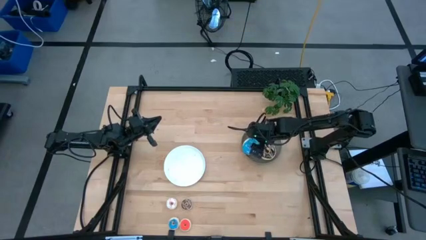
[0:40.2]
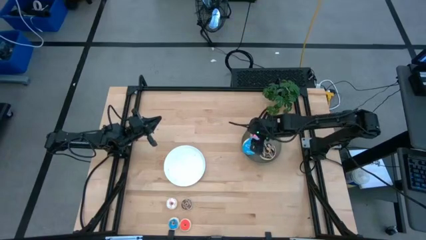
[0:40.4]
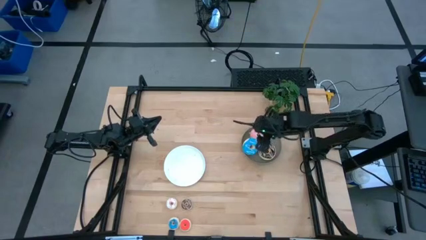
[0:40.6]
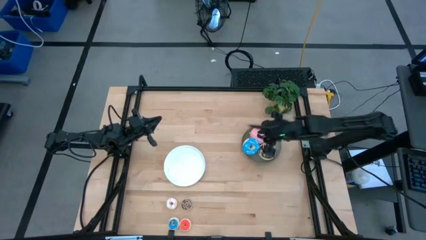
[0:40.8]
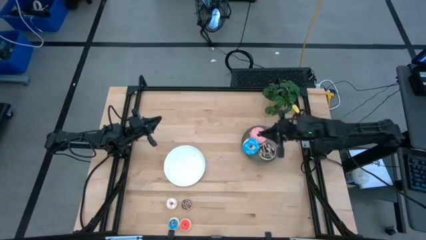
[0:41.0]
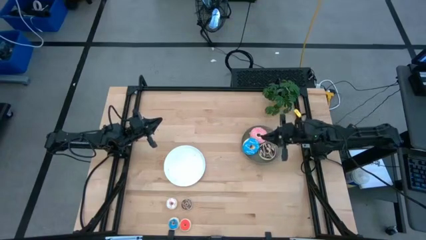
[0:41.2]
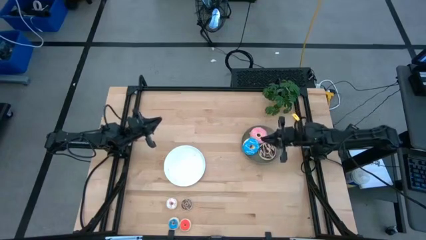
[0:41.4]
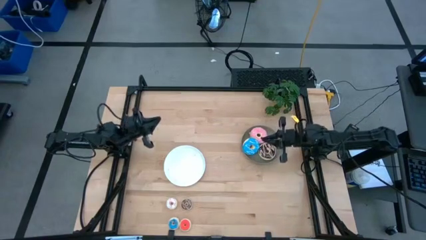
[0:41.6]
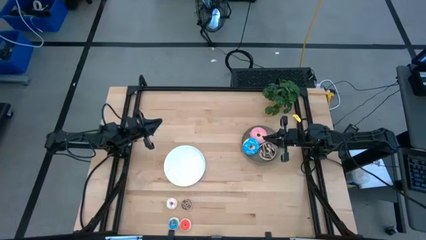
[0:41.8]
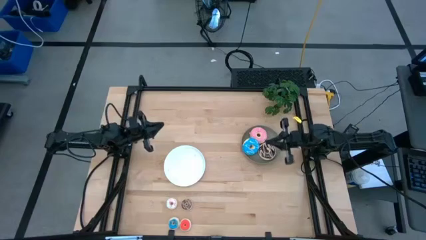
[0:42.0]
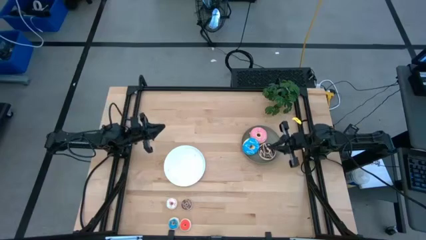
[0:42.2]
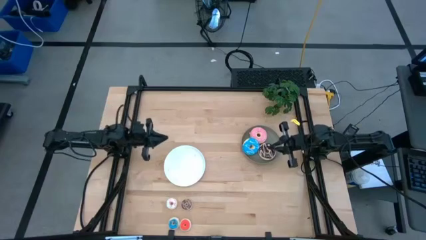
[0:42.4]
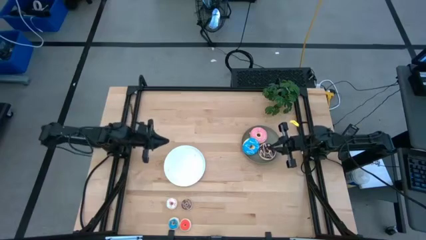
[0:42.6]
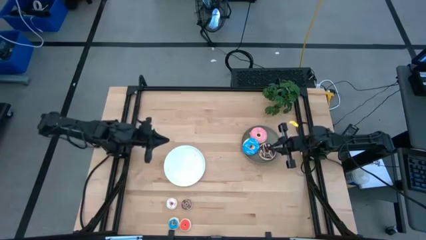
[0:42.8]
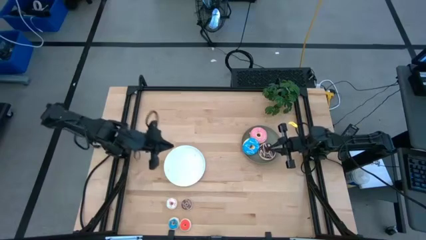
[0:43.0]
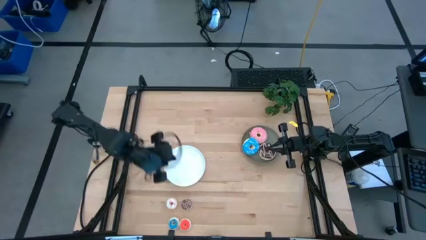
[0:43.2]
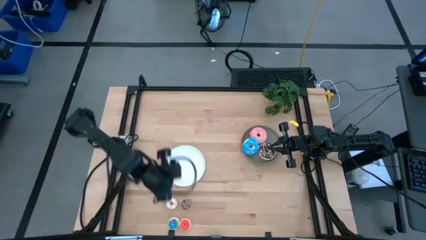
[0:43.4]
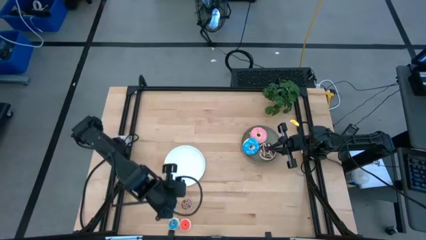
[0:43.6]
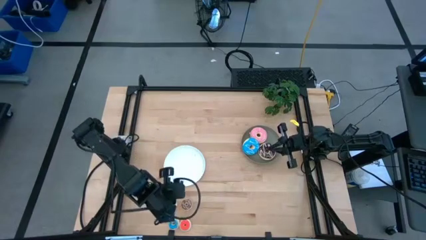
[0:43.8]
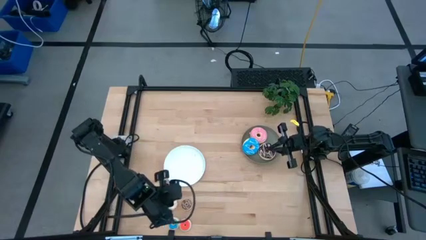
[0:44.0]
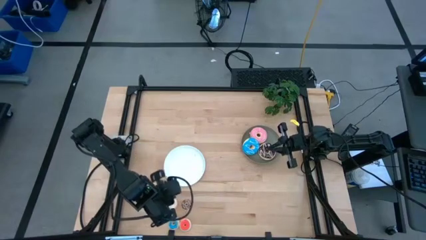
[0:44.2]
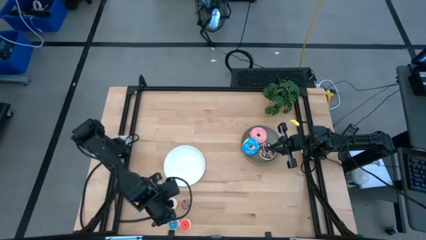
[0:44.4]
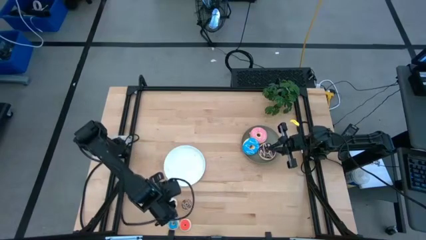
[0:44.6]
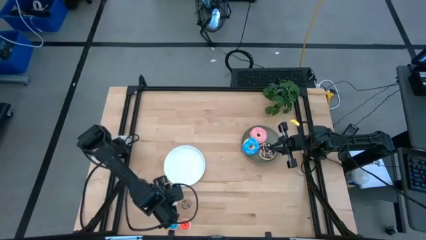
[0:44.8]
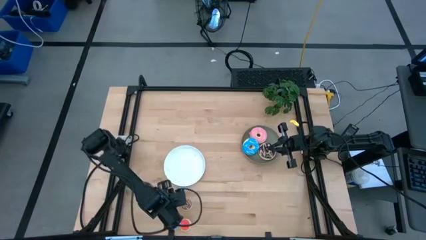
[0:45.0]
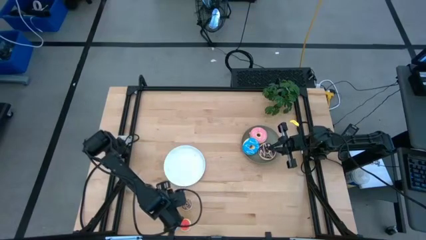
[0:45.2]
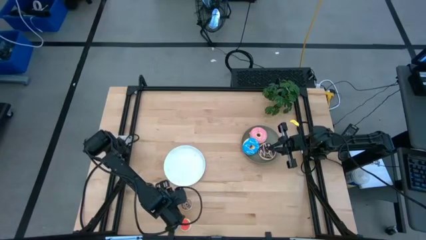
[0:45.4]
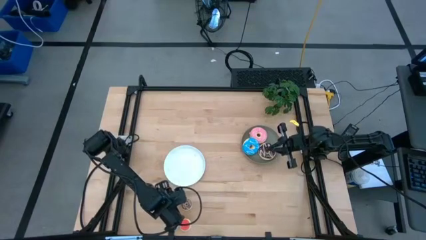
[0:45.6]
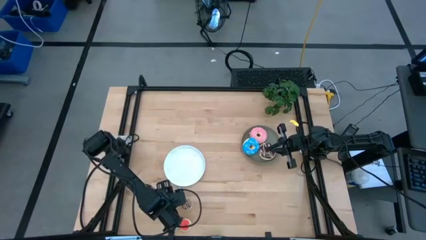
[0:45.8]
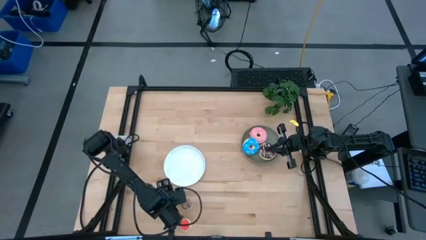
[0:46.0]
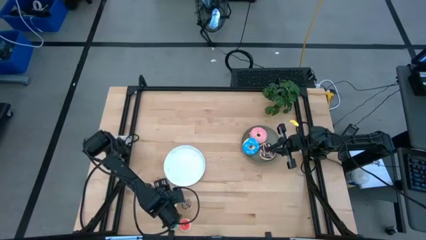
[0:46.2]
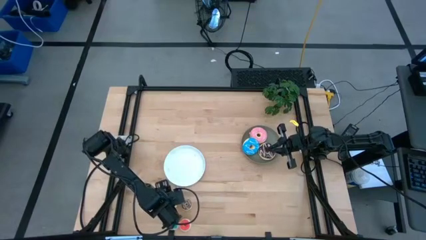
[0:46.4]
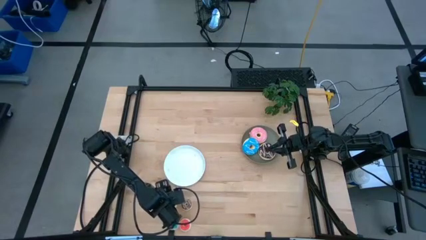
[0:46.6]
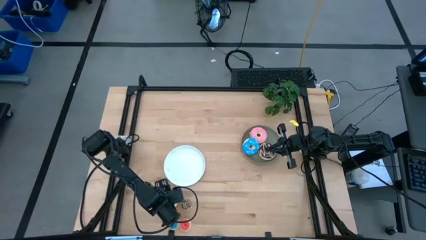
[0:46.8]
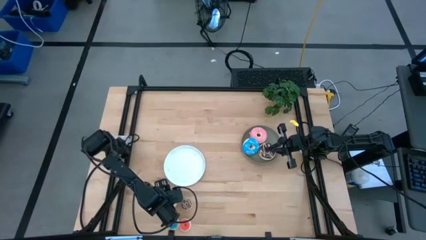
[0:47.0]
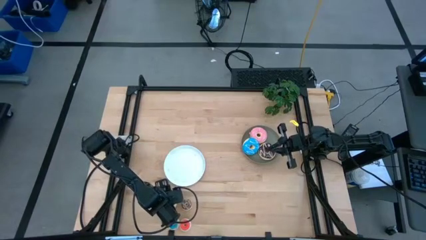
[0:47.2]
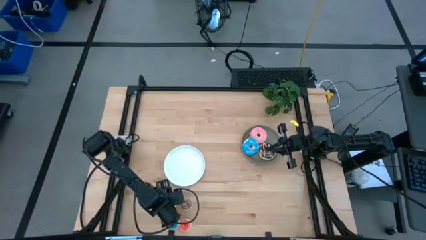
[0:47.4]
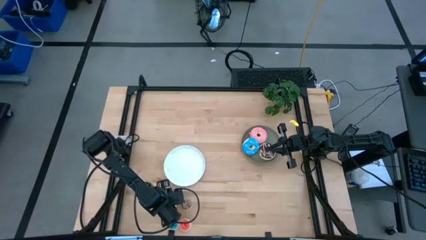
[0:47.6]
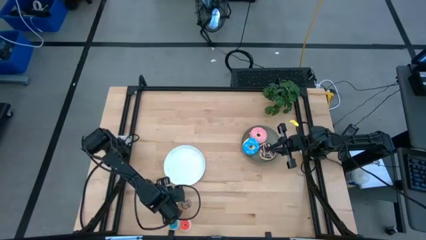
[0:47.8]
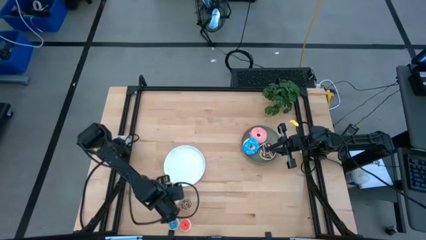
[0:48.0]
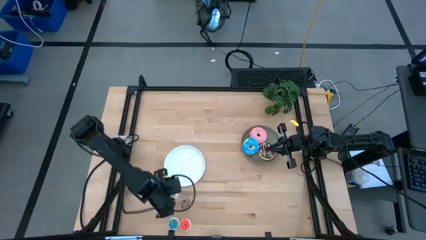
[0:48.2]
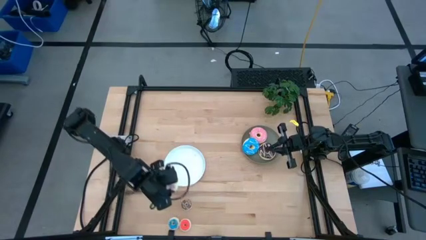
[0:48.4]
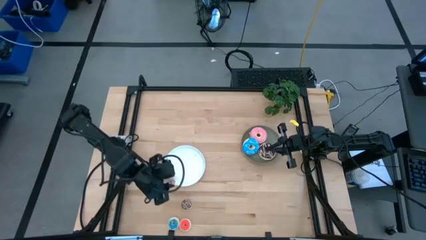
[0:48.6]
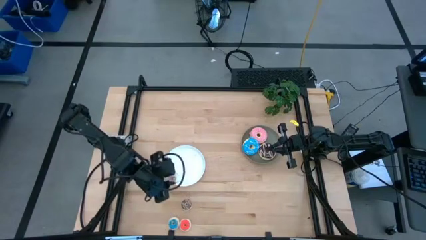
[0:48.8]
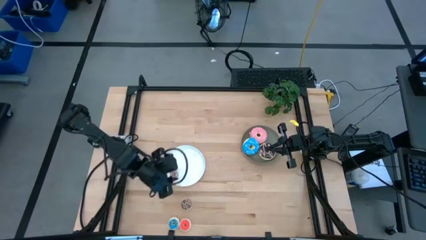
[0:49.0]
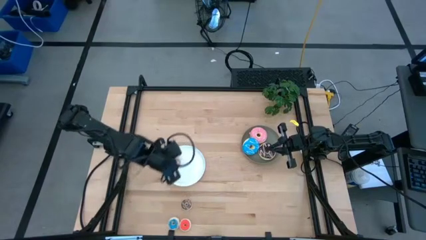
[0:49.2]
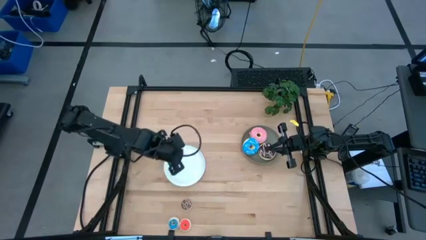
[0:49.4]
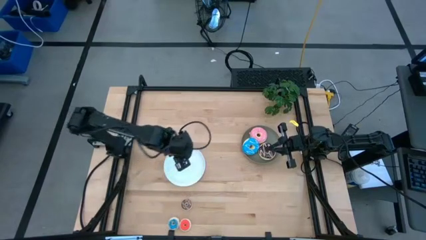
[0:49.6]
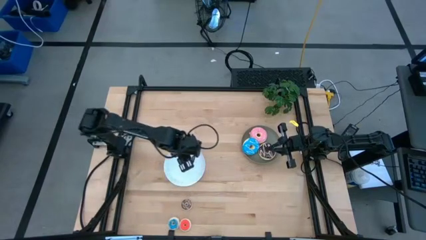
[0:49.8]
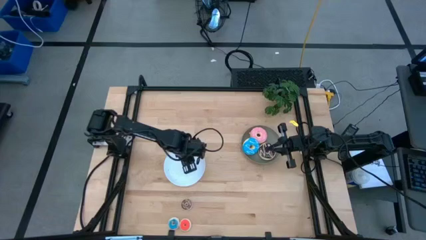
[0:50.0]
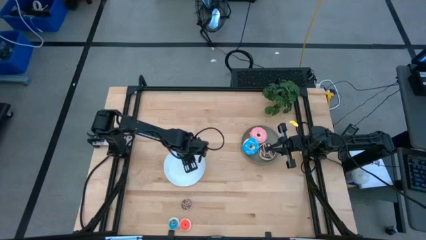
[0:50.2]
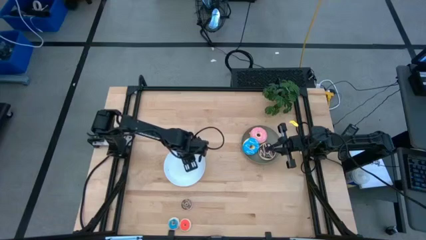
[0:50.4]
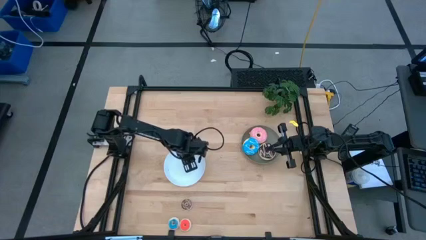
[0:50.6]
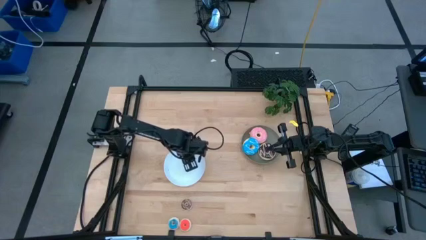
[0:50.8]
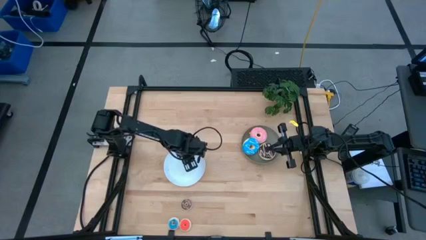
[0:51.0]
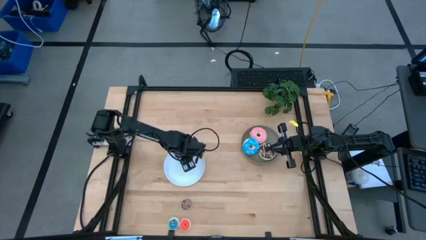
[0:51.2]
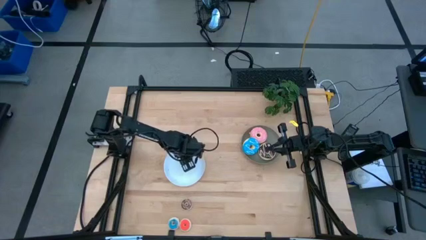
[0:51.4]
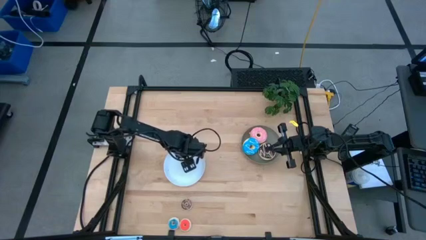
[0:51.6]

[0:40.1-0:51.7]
Task: Pick & Place donuts
Put the small white donut on the white plate

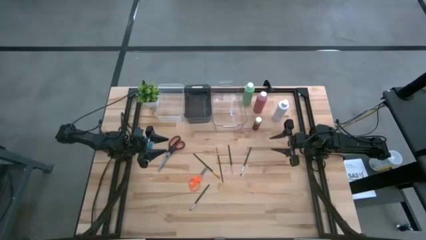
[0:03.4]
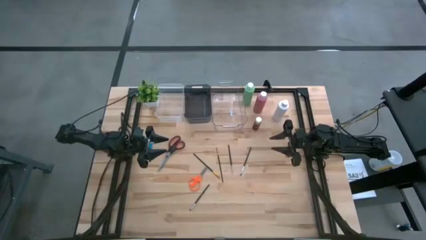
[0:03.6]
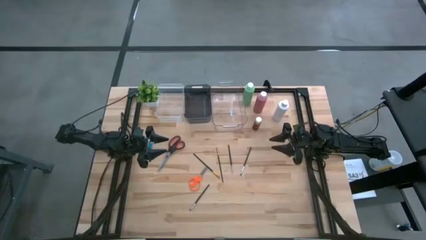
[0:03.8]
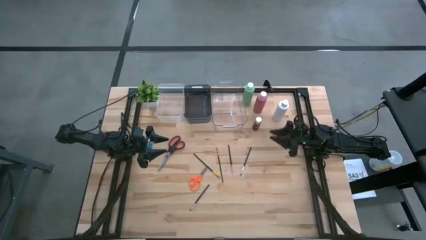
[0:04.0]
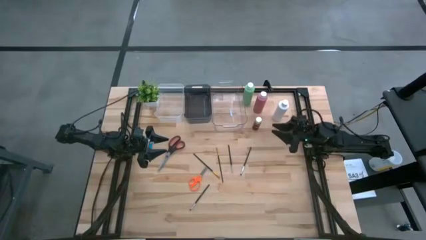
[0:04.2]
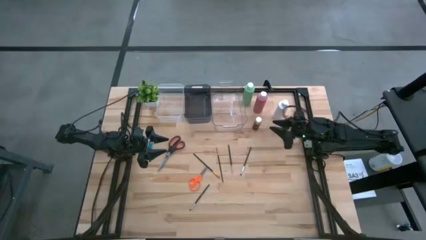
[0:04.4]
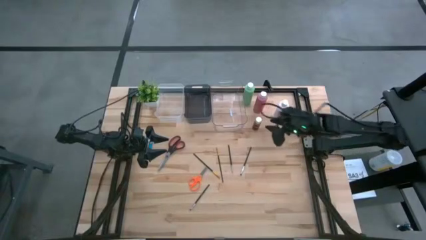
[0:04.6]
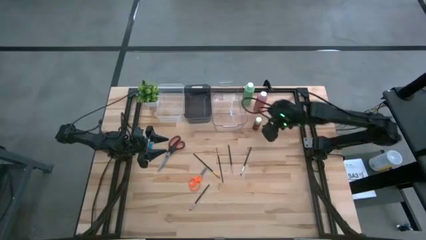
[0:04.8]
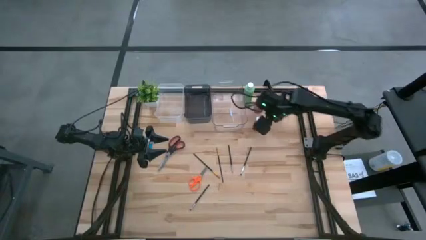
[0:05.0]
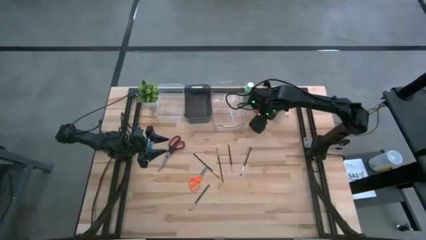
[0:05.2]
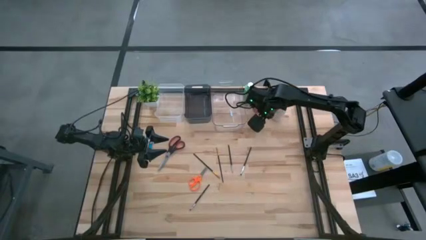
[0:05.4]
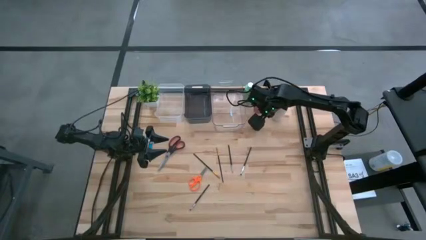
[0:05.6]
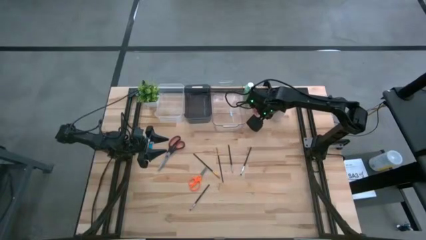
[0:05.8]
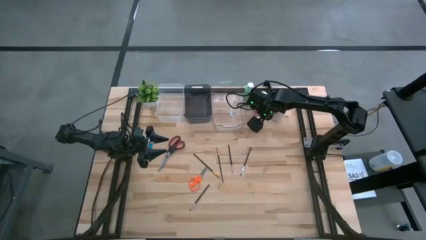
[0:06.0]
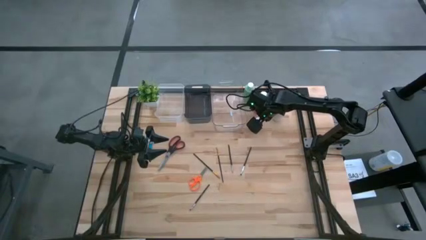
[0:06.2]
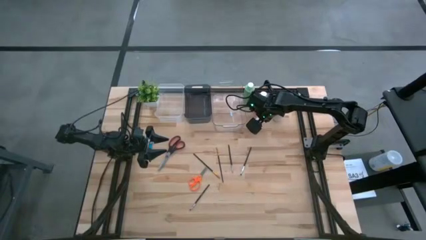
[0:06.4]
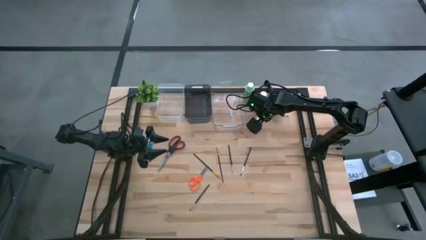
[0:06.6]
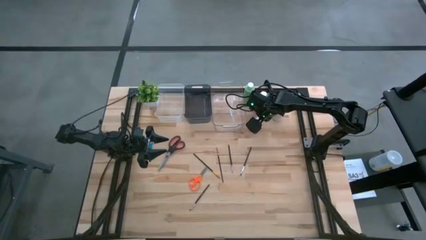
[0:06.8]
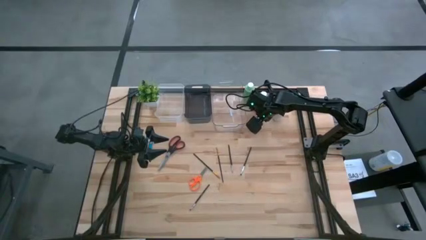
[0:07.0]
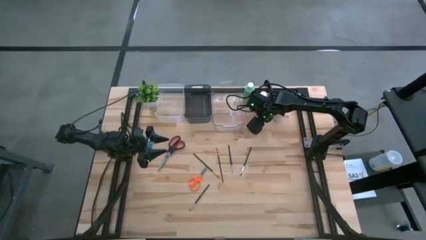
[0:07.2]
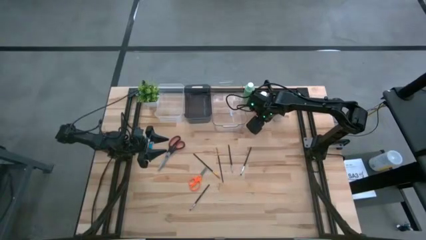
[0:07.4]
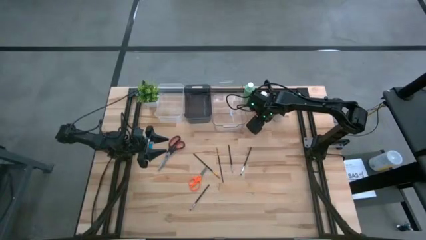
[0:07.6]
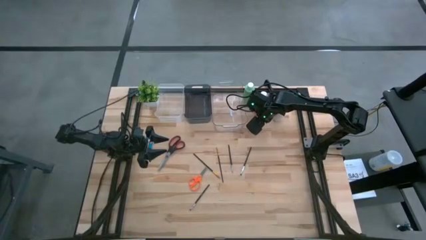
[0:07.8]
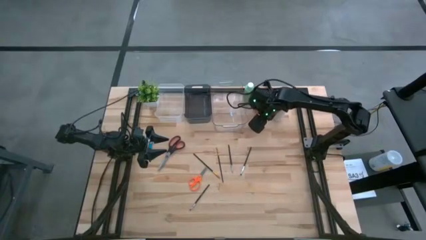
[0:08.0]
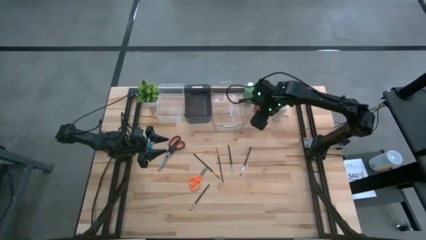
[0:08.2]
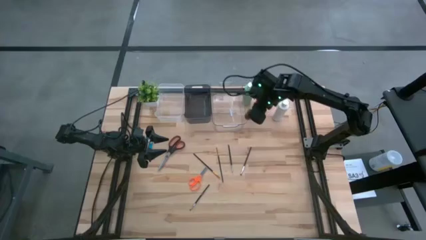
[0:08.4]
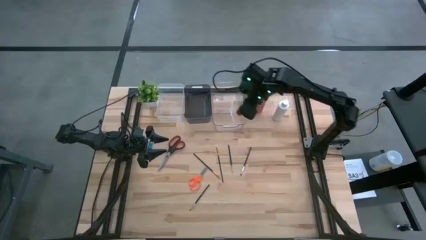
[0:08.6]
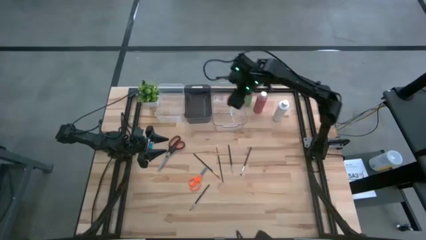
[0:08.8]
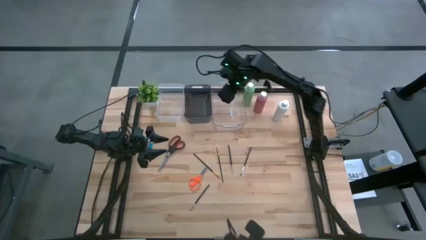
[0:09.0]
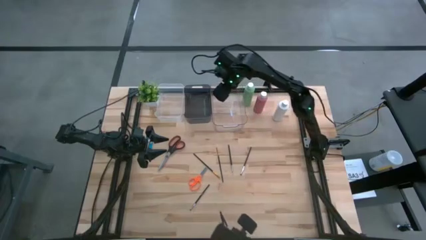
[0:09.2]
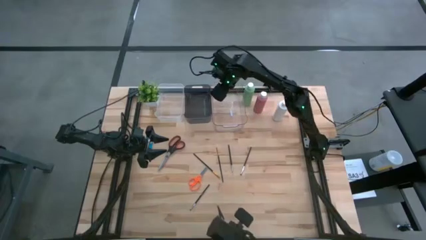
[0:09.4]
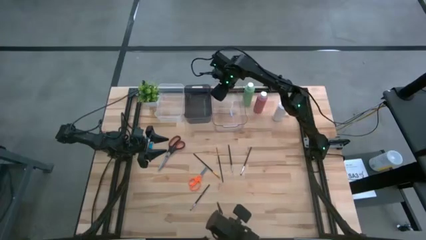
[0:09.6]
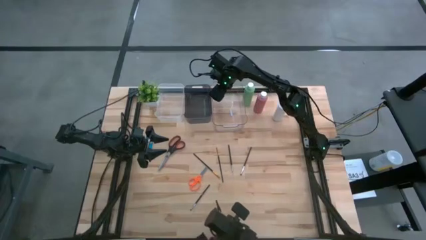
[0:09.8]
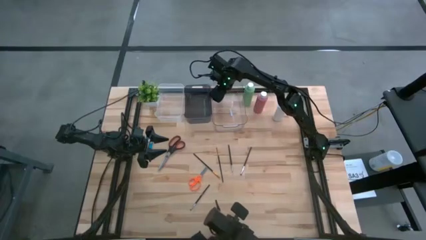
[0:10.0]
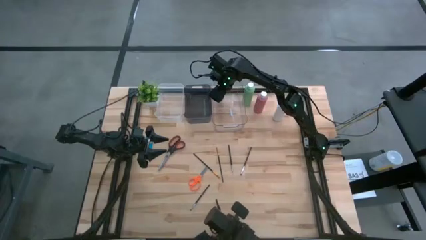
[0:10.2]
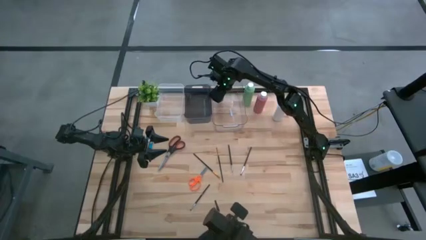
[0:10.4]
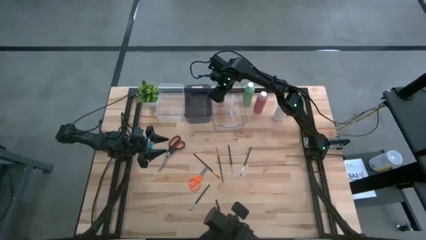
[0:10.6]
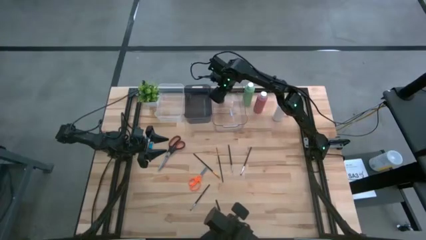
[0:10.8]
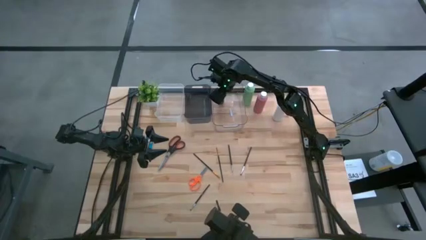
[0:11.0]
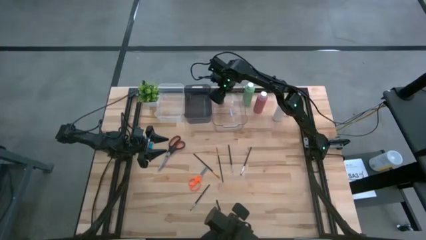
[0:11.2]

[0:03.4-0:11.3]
Task: Pick & Place Paint Supplies
Put the brown paint bottle into the right transparent bin
